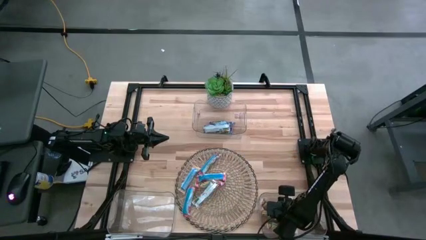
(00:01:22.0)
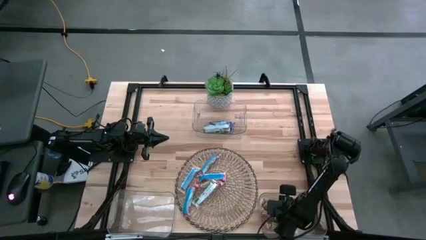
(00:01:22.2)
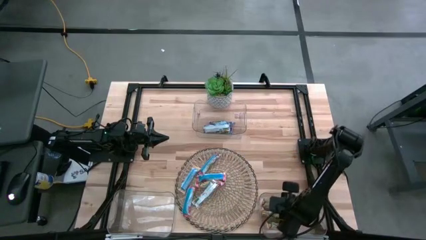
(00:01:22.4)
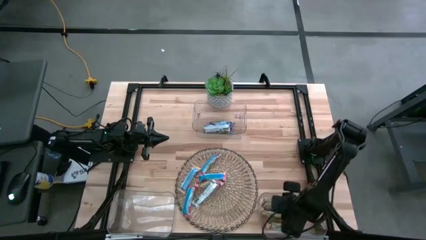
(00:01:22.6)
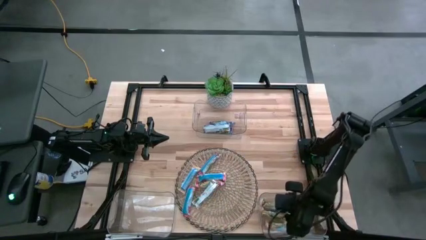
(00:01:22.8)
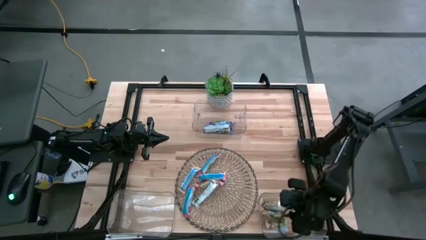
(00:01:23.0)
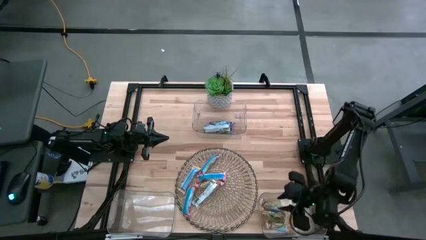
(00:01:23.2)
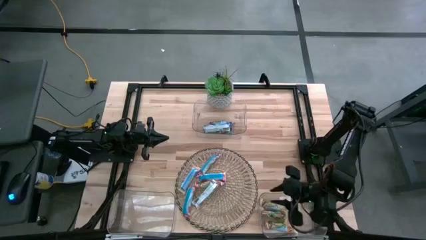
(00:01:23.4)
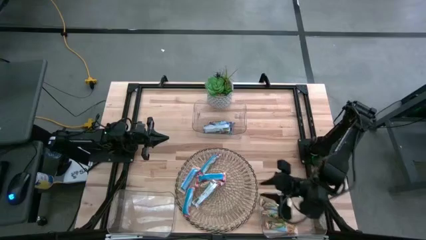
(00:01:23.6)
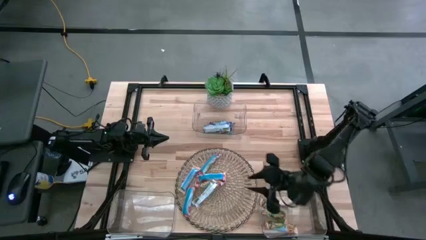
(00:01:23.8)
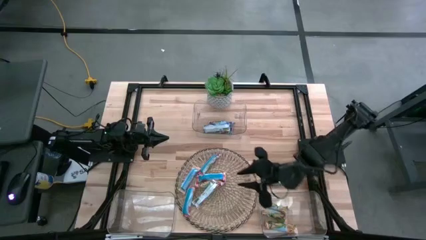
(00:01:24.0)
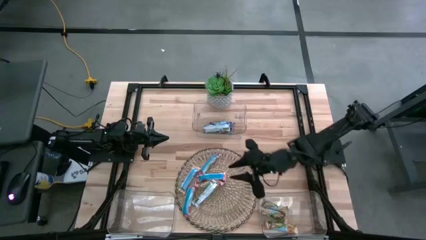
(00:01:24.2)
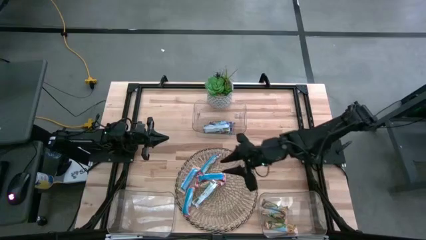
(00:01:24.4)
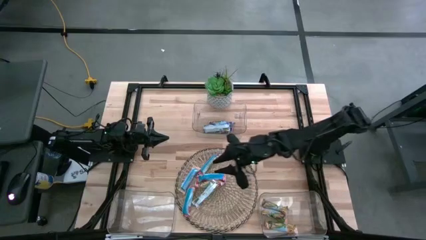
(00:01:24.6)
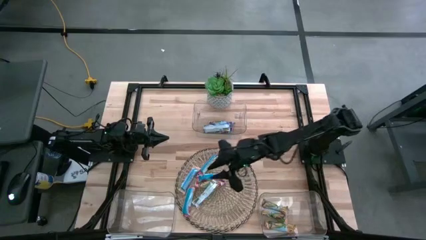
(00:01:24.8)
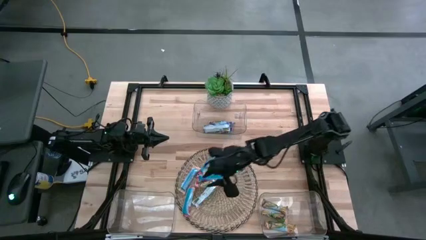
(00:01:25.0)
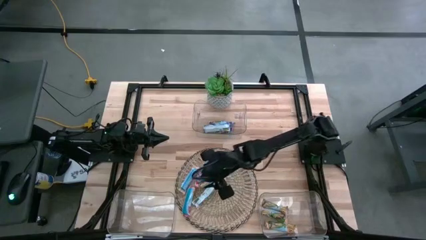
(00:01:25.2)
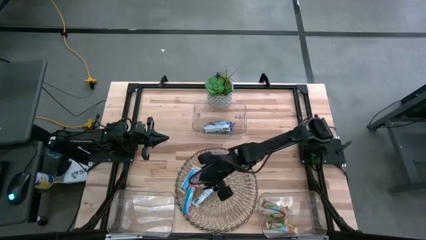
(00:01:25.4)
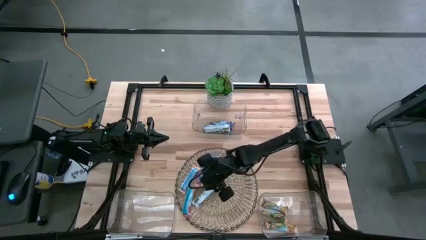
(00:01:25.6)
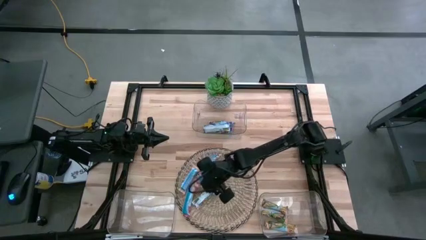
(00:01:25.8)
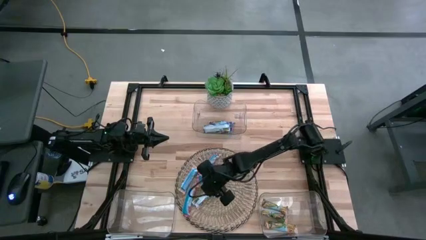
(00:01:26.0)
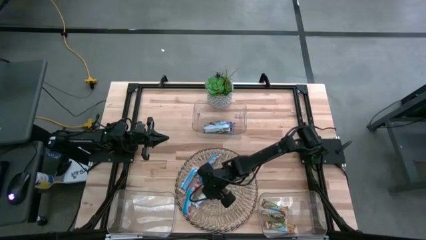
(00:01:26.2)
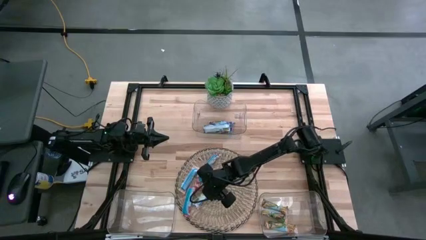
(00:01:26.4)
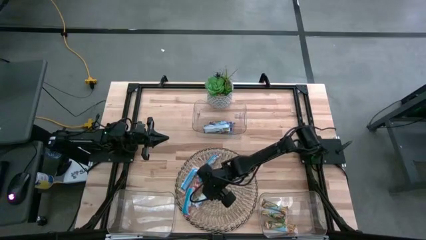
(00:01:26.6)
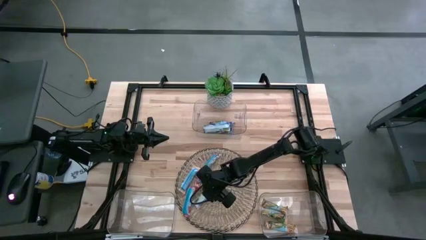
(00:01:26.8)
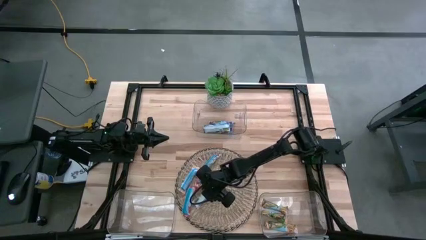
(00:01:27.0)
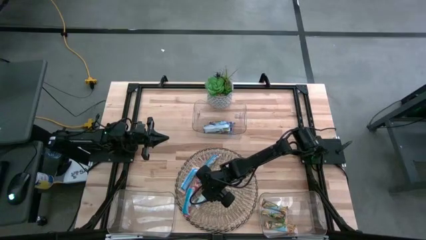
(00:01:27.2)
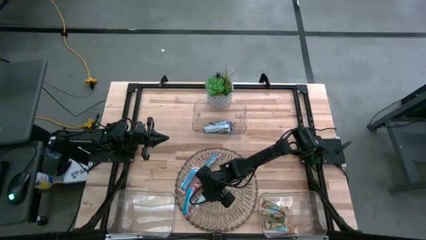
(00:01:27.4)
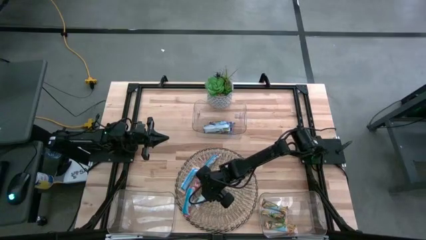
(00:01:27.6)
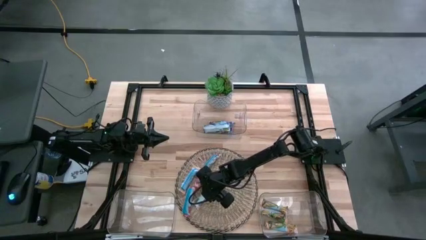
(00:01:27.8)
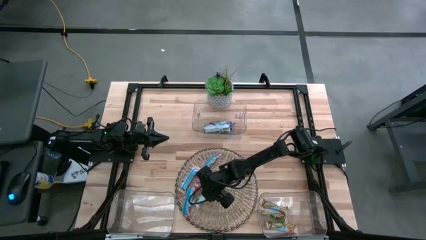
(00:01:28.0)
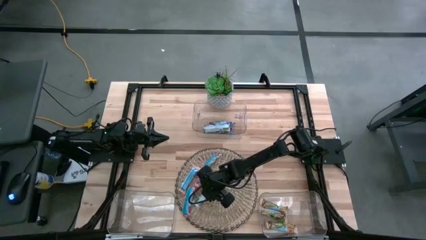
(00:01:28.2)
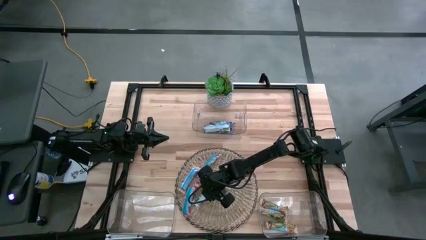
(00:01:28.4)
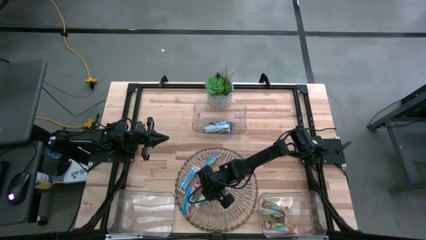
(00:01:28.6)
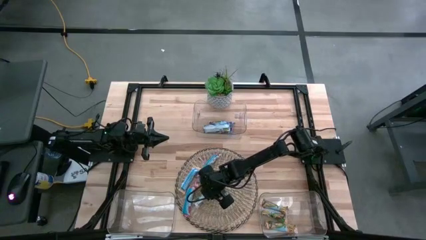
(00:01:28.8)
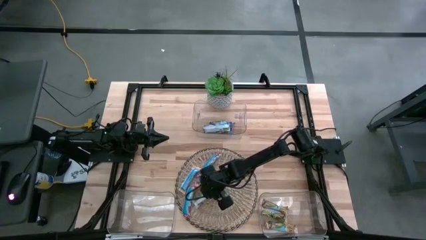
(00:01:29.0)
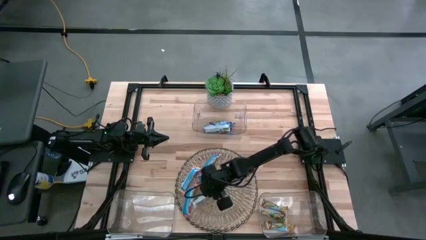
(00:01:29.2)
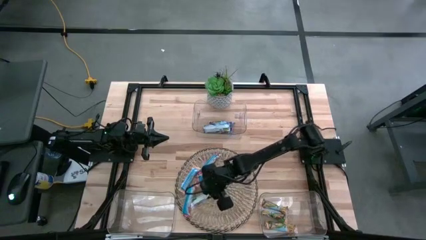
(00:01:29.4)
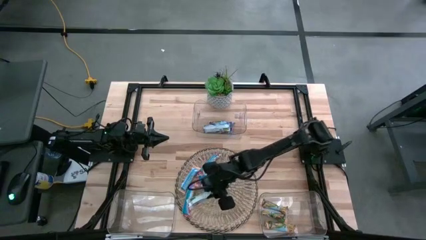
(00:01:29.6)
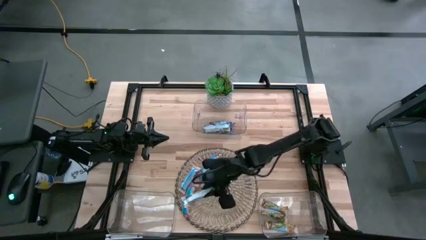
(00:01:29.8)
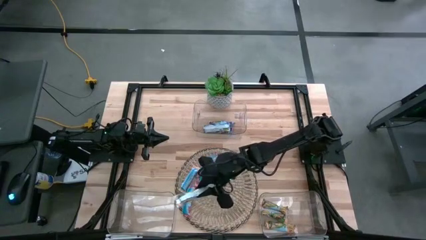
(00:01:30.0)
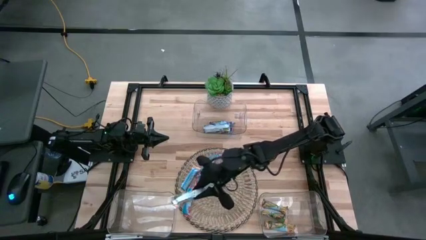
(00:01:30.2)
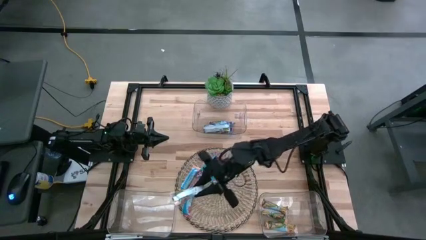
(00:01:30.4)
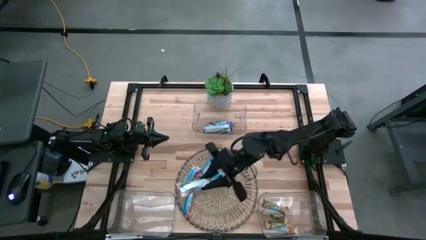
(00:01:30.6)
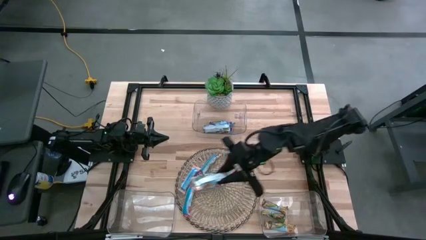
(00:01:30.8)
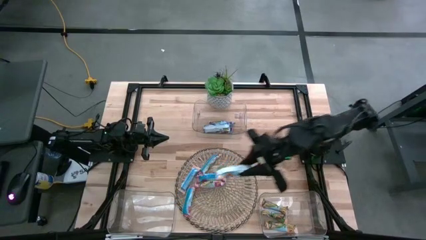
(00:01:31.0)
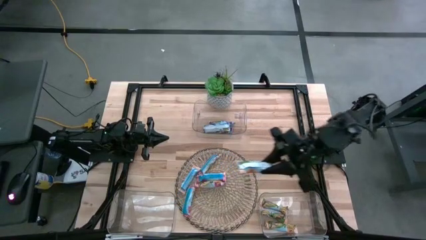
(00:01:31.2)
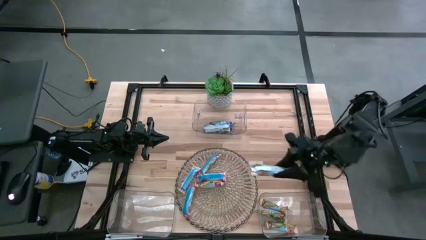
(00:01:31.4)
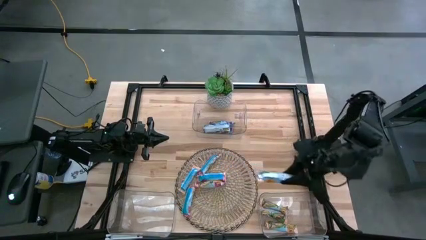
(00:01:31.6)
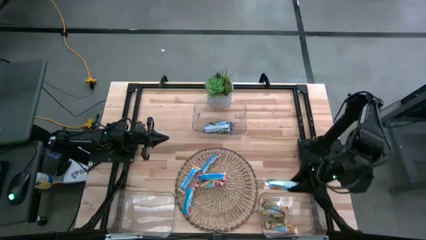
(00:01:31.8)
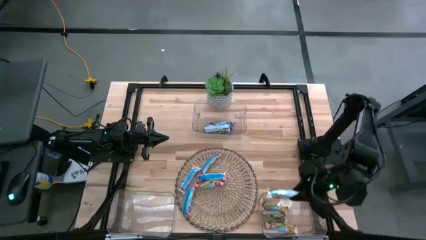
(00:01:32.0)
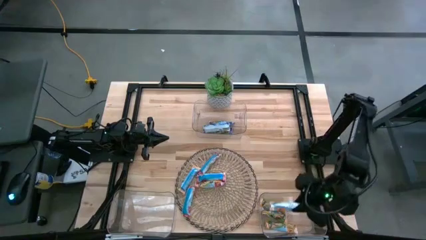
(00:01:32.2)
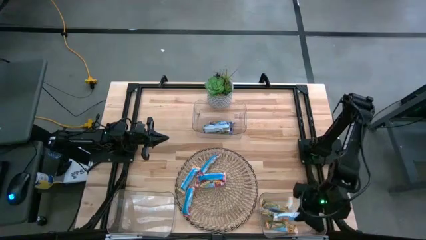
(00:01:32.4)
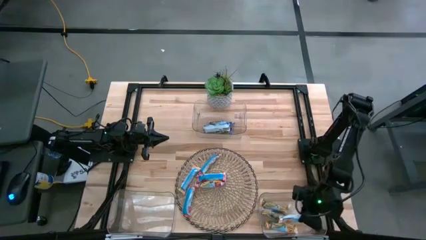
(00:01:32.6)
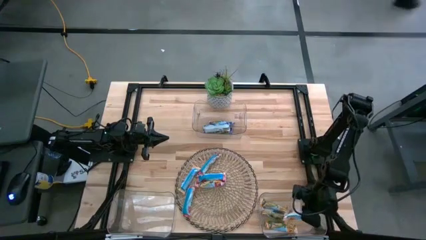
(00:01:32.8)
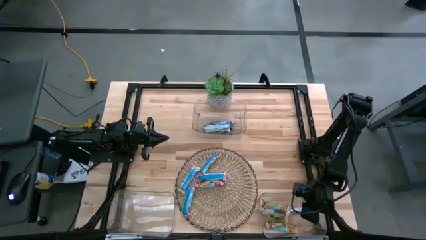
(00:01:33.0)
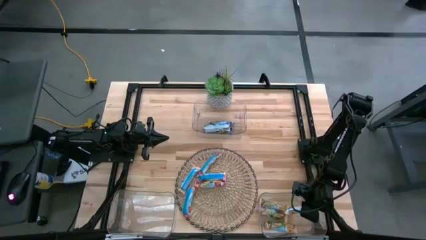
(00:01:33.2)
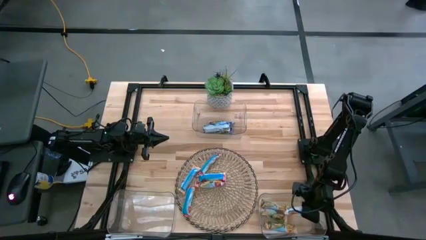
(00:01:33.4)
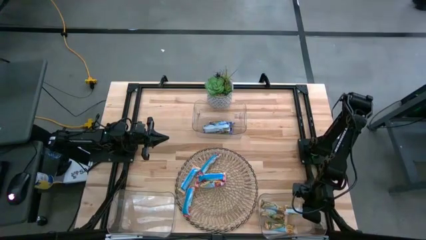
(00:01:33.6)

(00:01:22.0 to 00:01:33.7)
Task: Pick and place Granola Bars by type
Put the yellow granola bar into the bottom right transparent bin

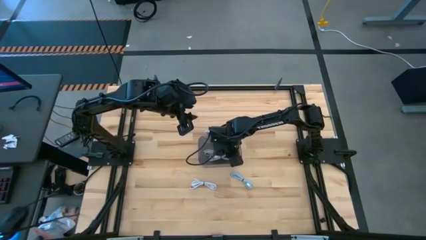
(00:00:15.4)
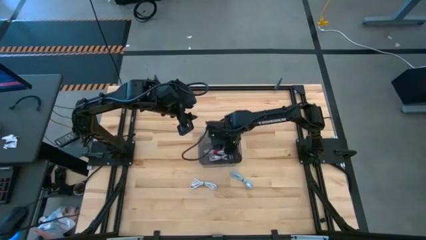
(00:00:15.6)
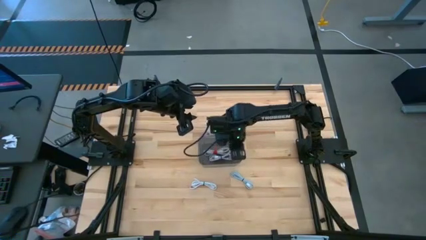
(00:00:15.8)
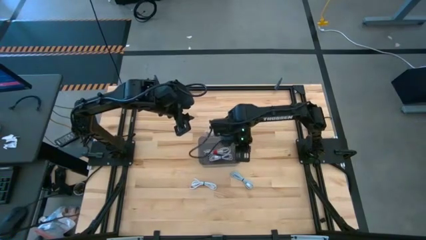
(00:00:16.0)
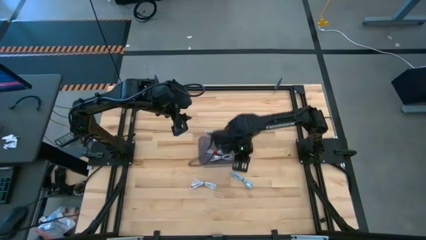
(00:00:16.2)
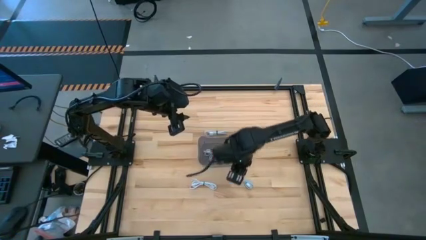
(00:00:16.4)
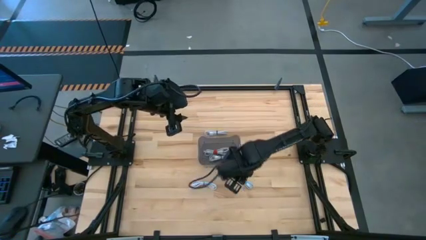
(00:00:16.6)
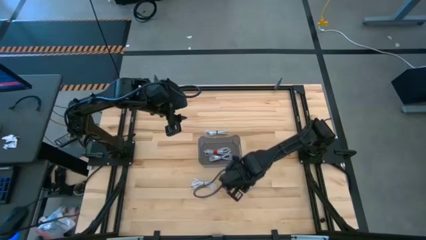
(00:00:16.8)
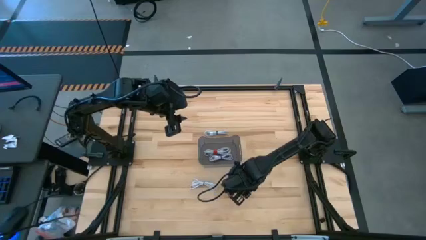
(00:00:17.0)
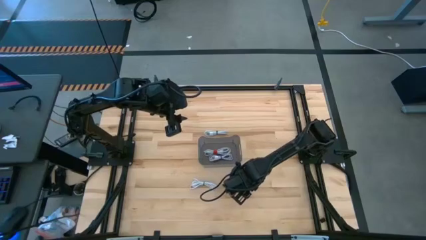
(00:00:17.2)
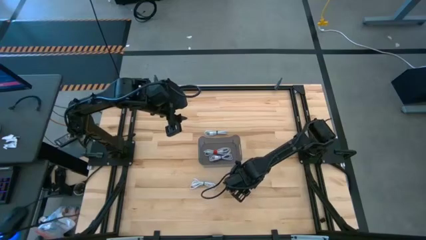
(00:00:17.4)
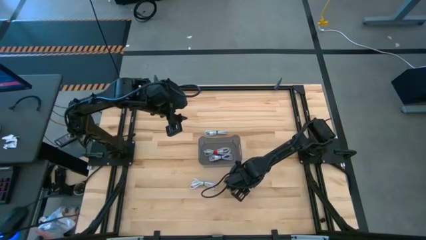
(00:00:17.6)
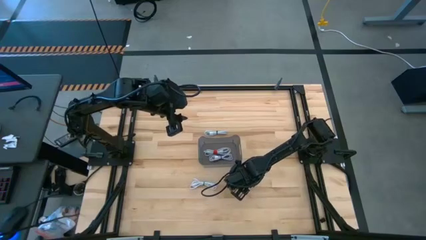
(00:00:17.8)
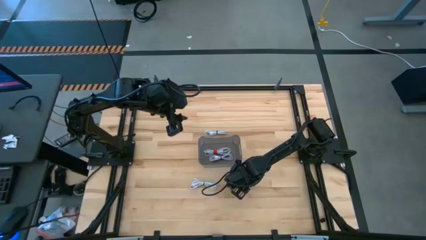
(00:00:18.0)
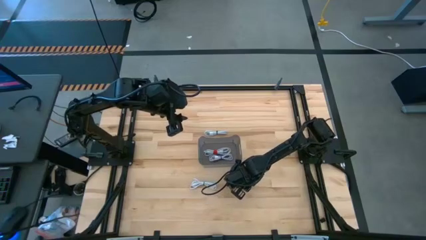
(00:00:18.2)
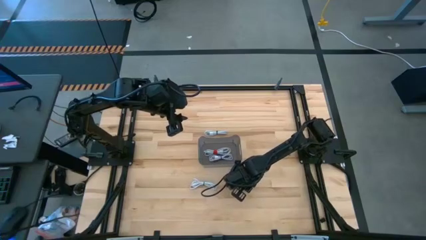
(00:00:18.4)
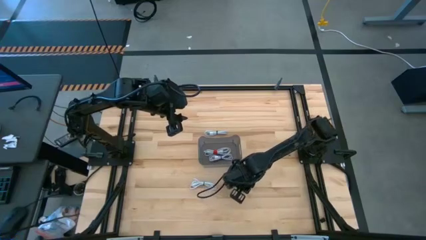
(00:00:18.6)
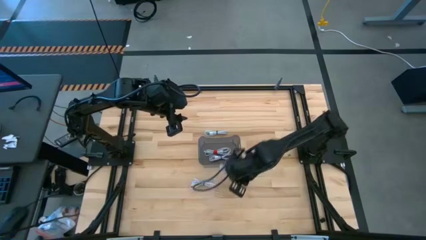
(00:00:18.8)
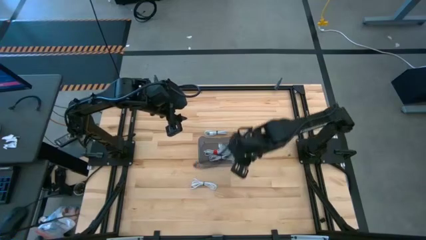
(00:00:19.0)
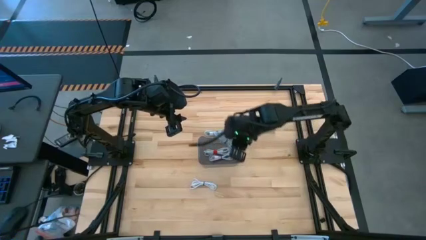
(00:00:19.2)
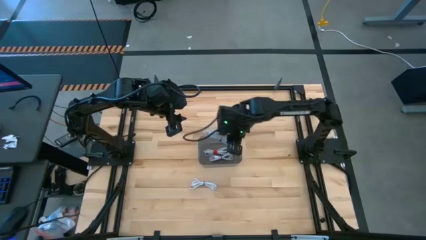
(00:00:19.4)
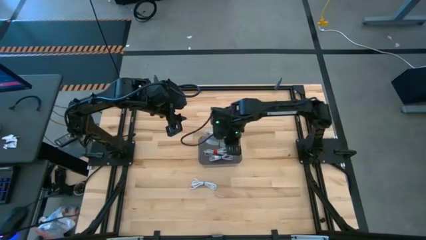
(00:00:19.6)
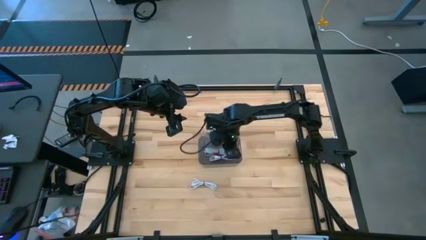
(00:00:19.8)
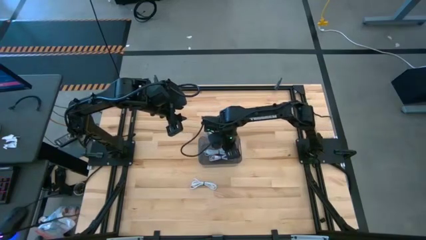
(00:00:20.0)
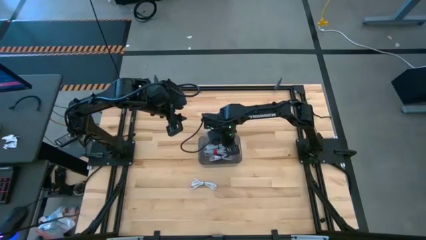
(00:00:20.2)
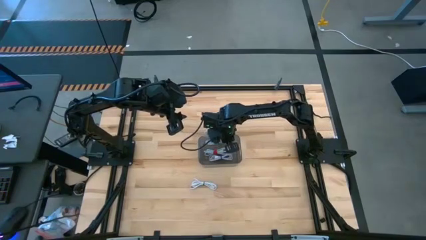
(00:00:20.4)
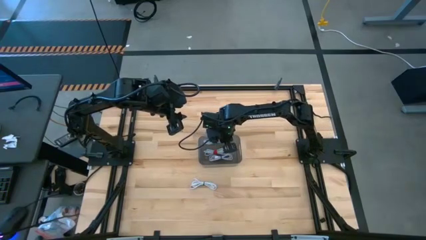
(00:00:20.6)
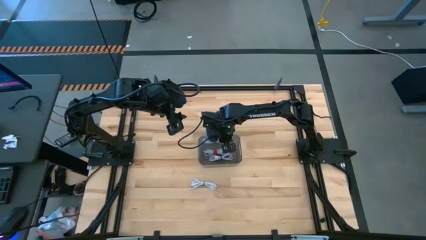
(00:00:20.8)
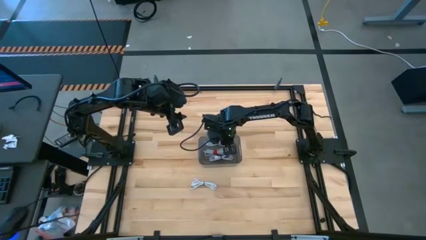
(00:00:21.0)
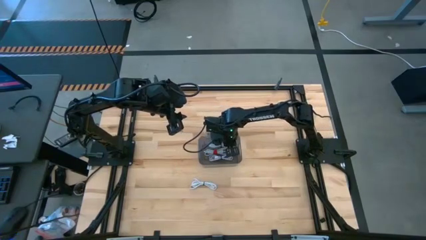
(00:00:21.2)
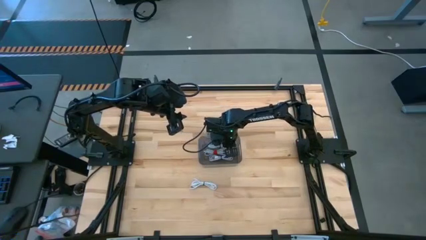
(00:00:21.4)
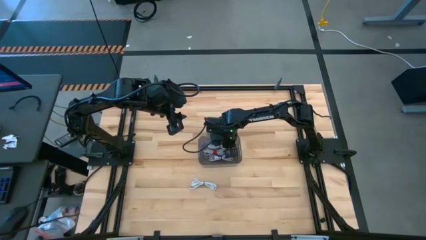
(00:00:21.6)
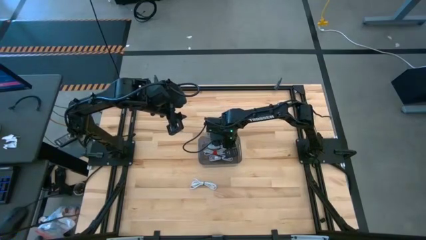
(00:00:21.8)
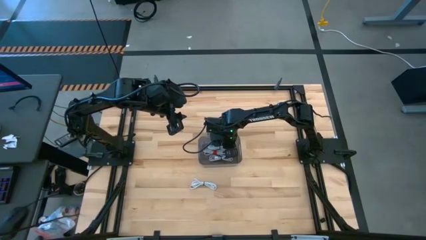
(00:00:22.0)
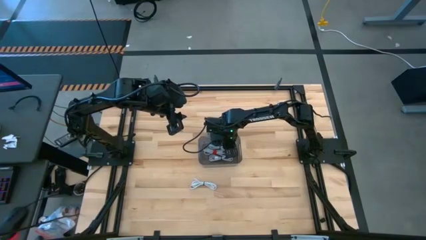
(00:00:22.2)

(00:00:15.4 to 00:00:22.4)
Task: Pick and place USB-C Cables
Put the light blue charger cable in the black bin
